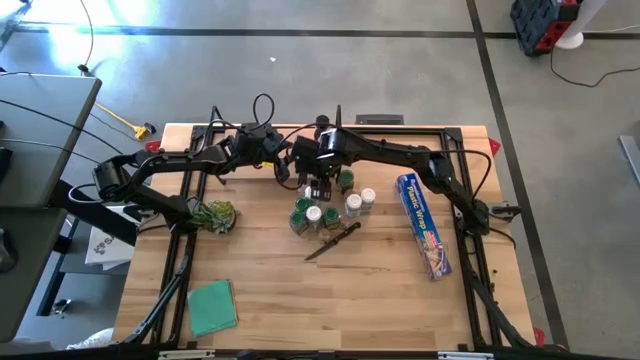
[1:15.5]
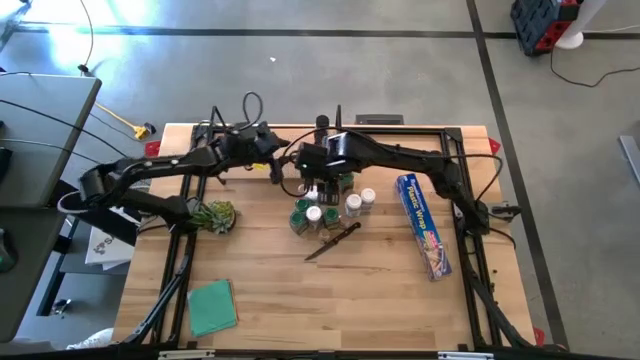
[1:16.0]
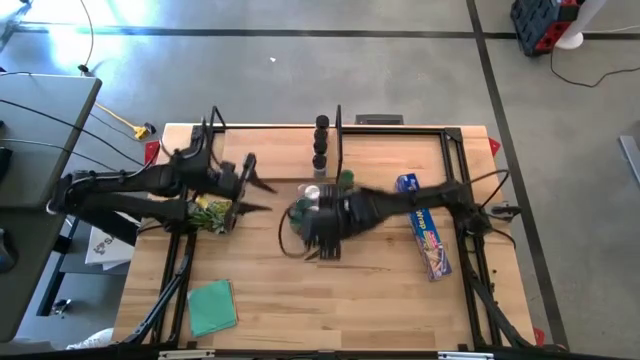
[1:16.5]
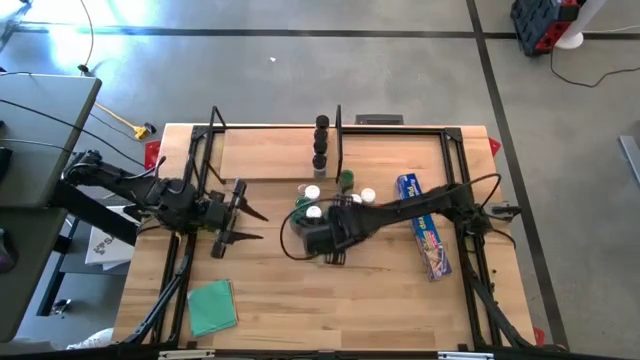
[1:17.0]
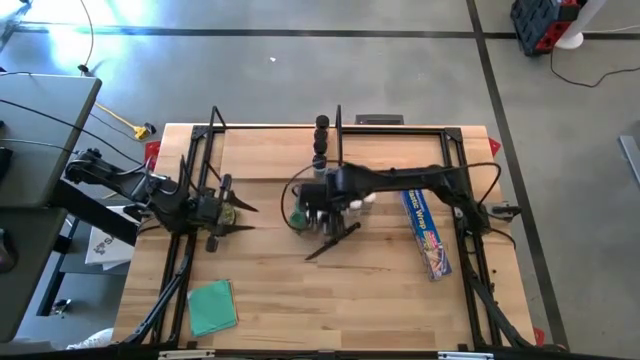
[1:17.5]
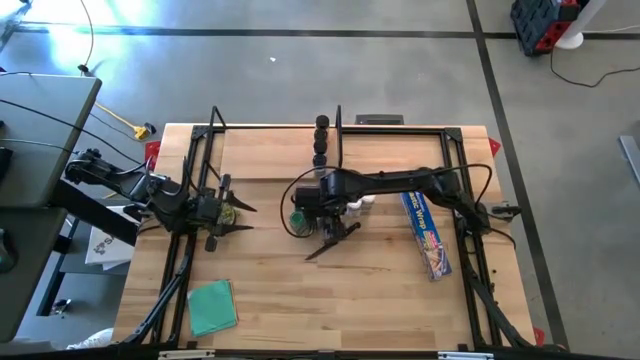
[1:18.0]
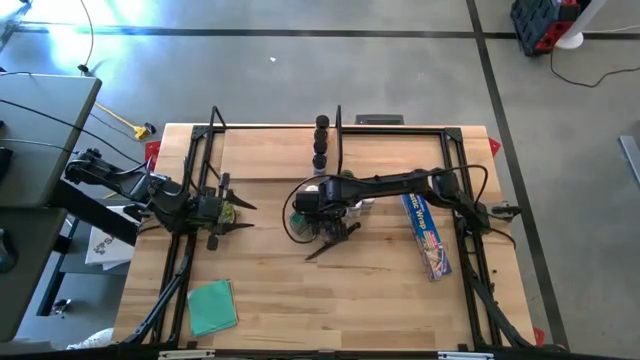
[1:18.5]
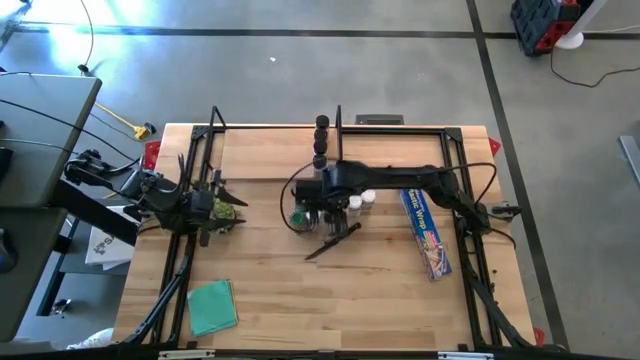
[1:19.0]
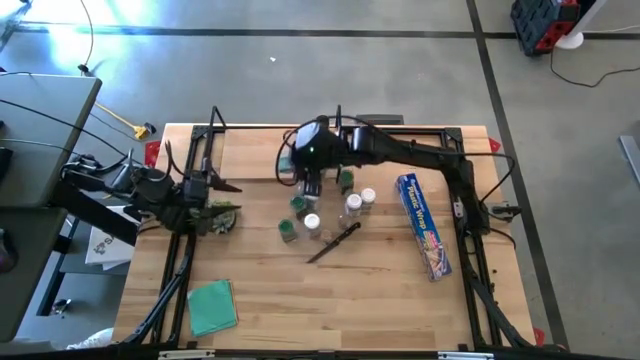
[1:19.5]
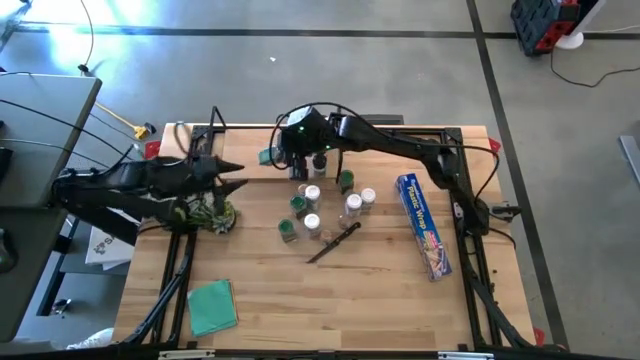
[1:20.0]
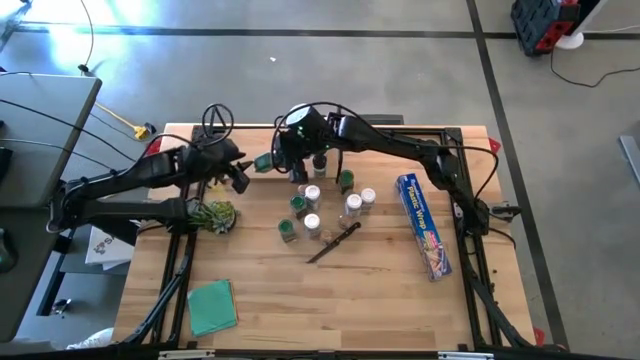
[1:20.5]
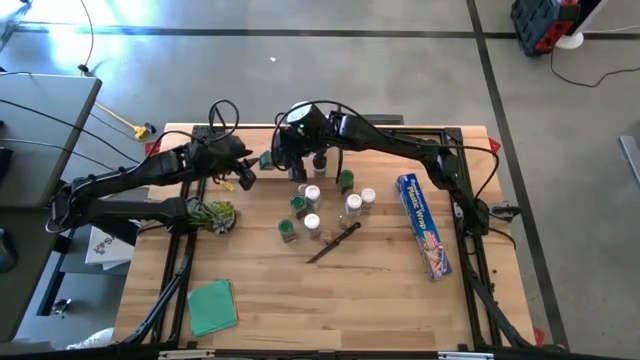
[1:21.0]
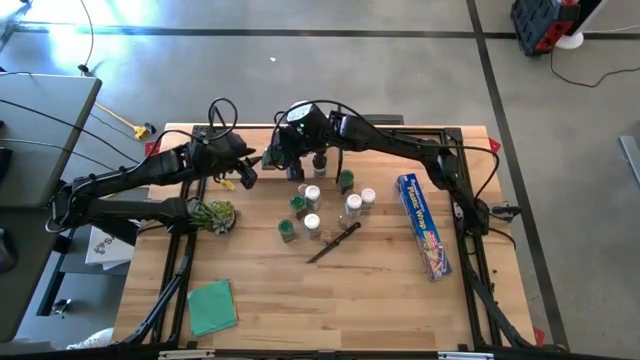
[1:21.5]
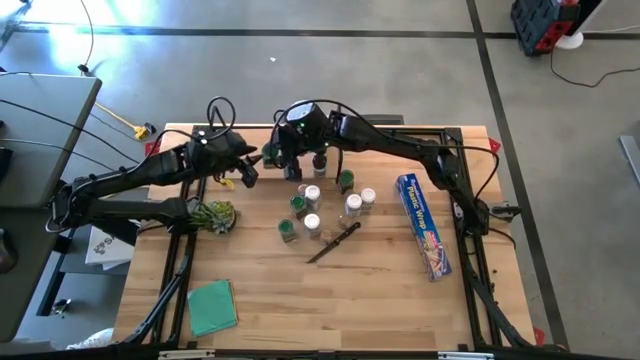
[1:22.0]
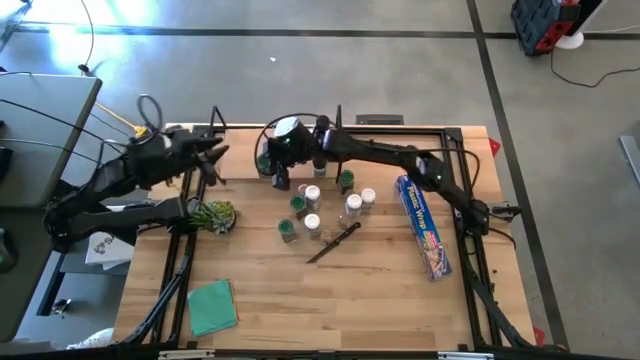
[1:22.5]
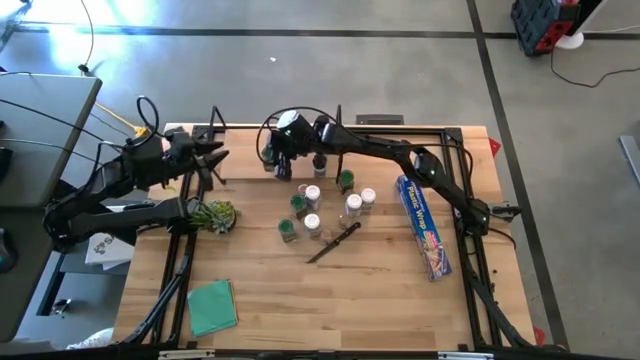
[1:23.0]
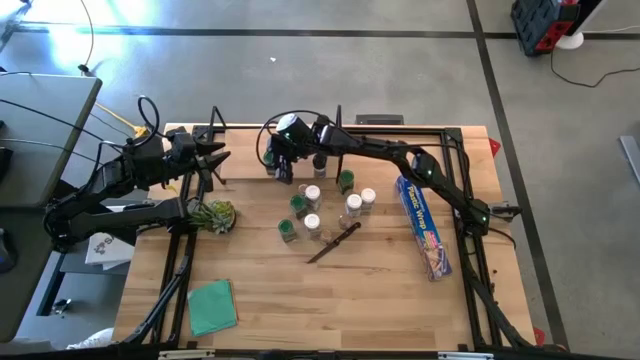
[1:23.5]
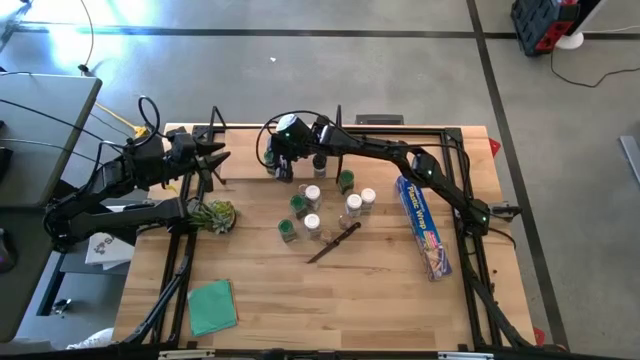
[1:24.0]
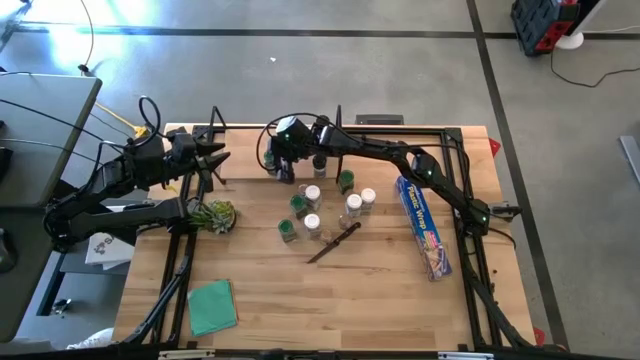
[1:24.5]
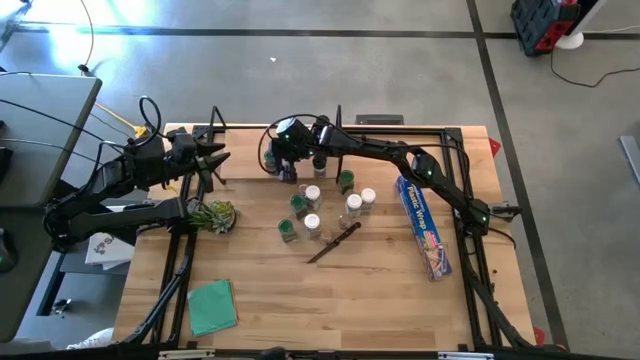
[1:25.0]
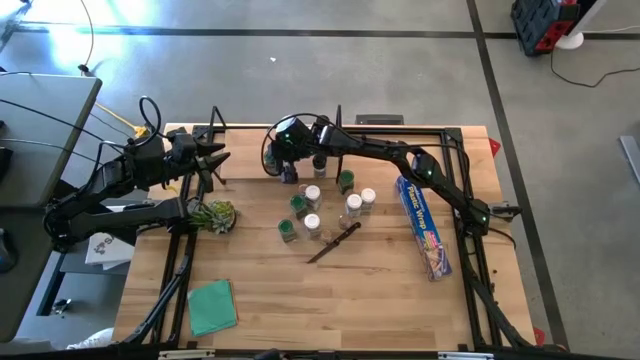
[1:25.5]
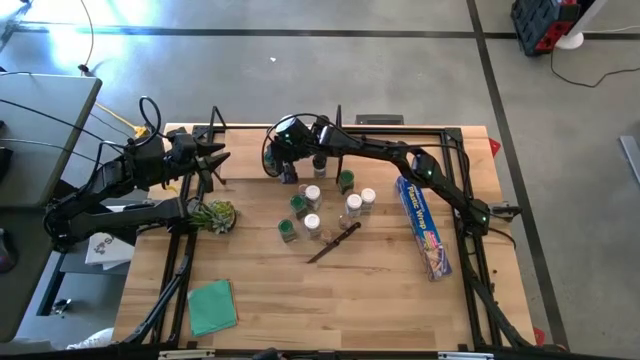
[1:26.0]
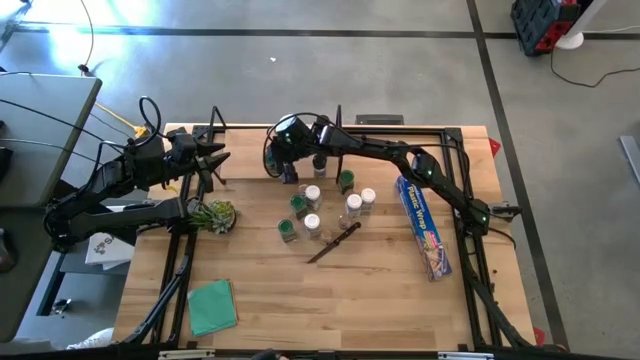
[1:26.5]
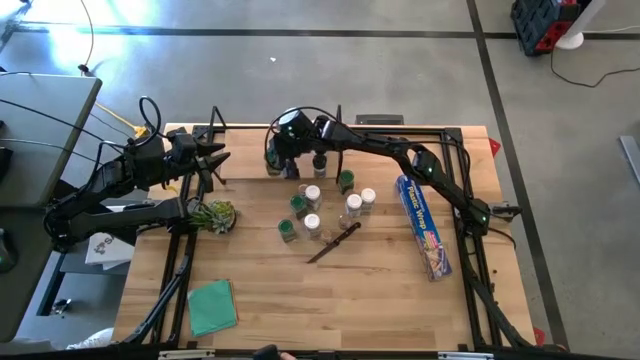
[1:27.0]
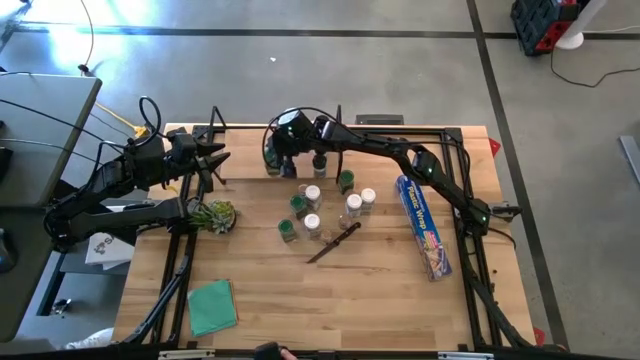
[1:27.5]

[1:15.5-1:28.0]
Task: Shelf spices
Put the green lid seasoning bottle on the shelf
